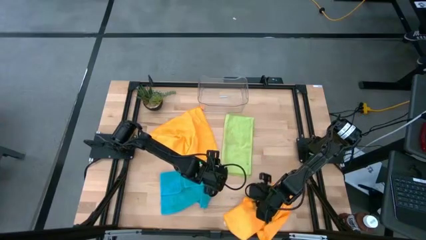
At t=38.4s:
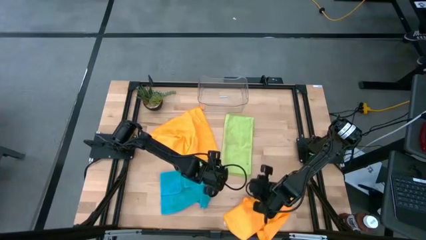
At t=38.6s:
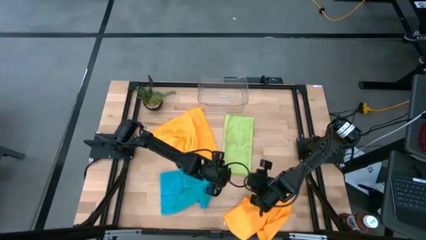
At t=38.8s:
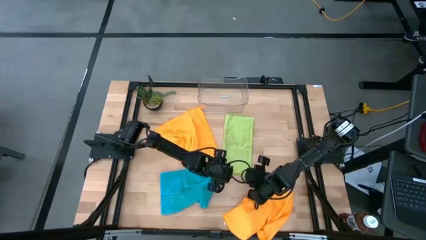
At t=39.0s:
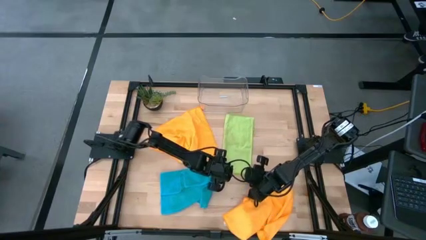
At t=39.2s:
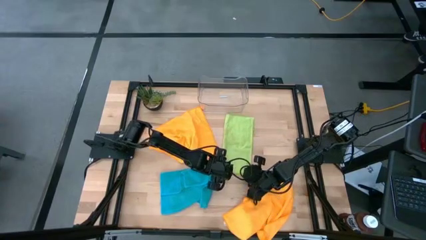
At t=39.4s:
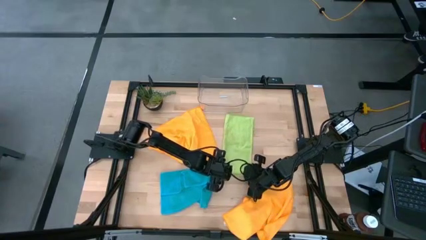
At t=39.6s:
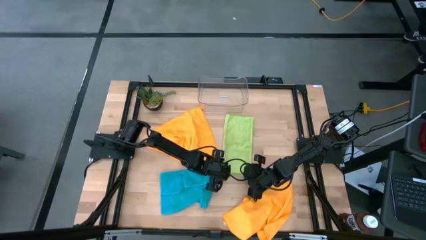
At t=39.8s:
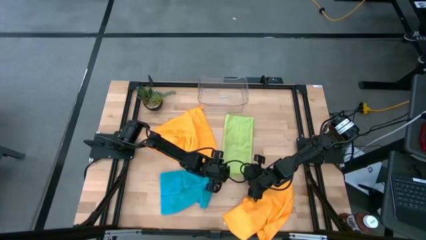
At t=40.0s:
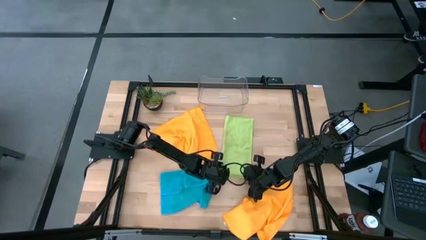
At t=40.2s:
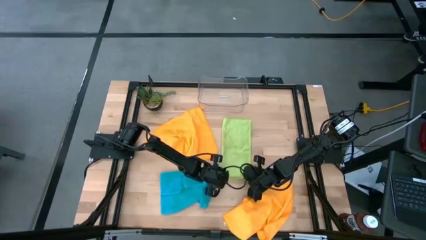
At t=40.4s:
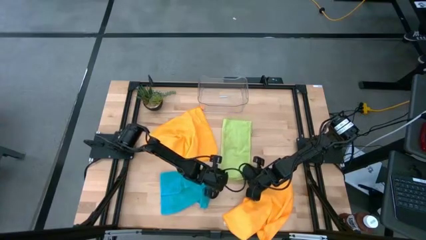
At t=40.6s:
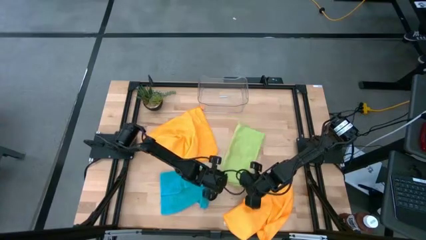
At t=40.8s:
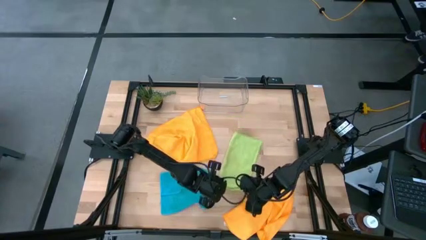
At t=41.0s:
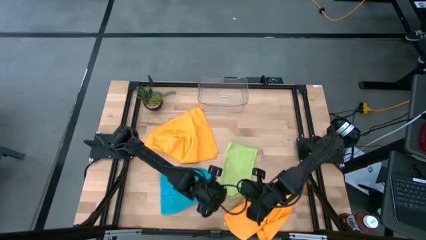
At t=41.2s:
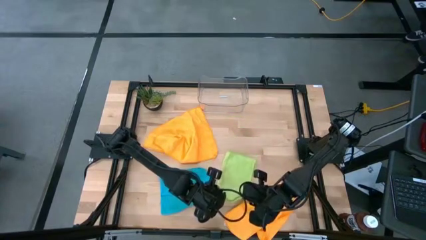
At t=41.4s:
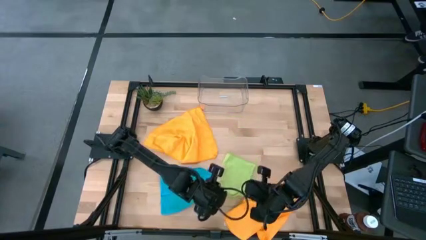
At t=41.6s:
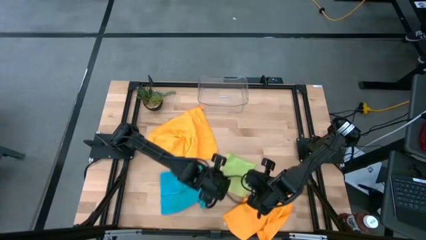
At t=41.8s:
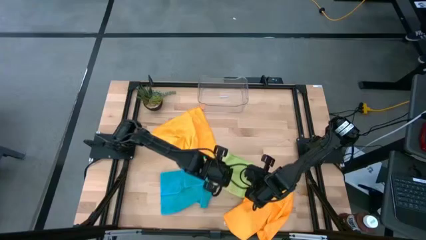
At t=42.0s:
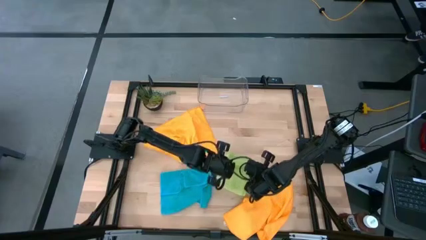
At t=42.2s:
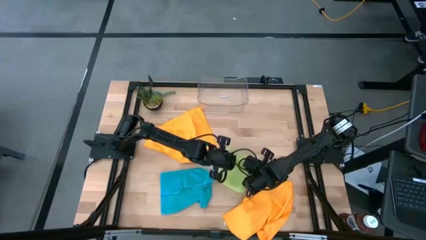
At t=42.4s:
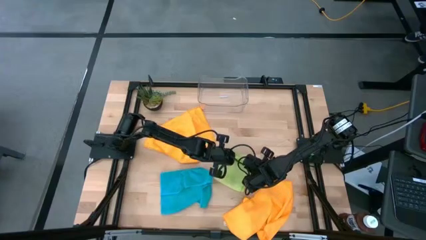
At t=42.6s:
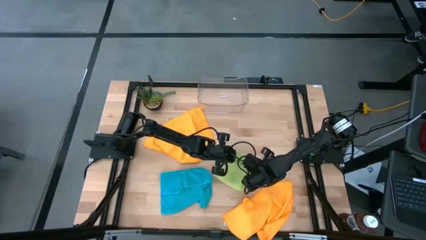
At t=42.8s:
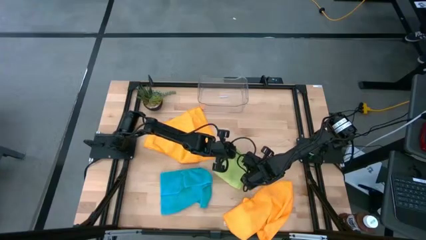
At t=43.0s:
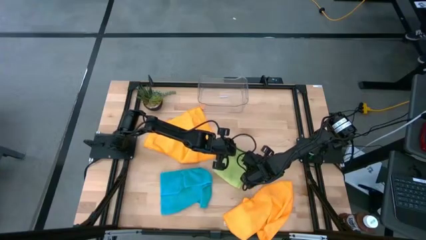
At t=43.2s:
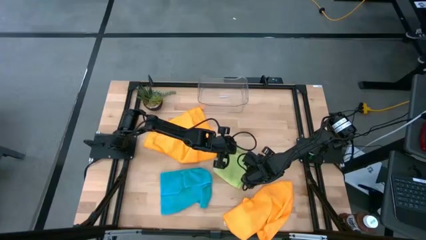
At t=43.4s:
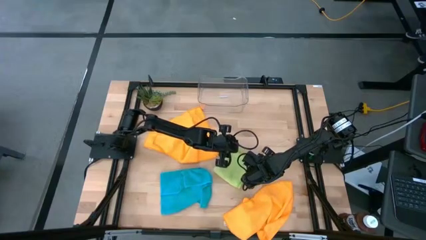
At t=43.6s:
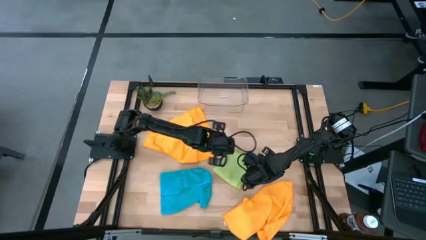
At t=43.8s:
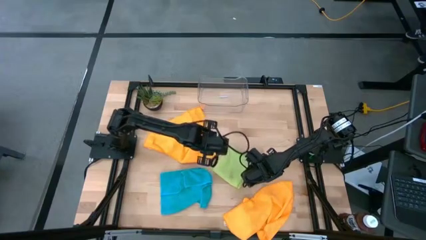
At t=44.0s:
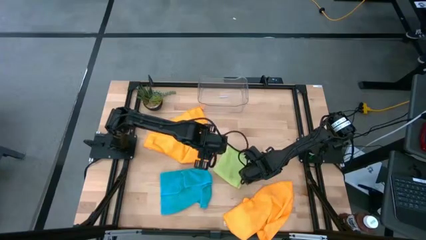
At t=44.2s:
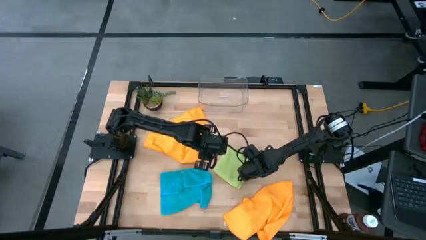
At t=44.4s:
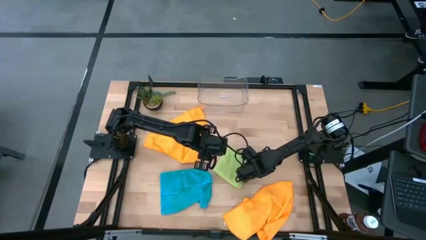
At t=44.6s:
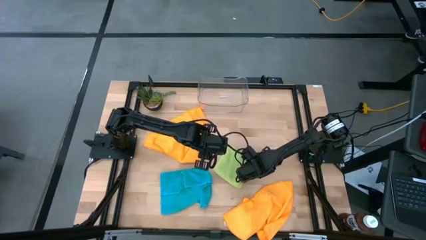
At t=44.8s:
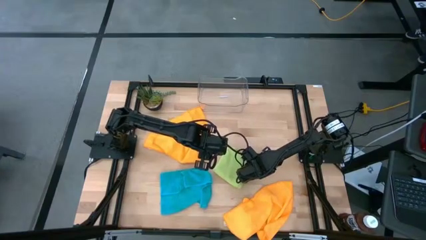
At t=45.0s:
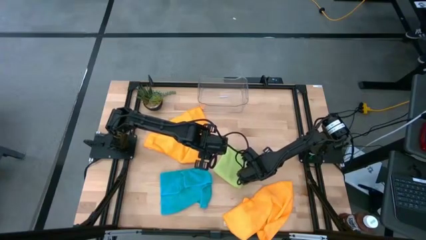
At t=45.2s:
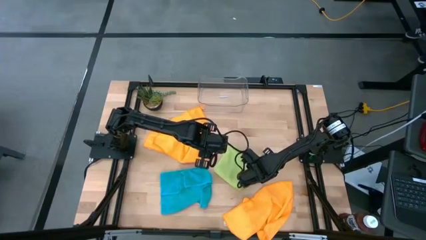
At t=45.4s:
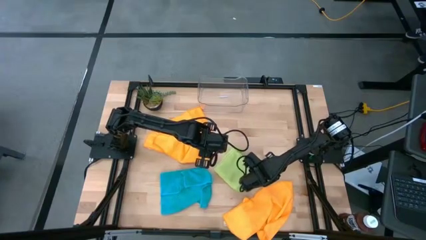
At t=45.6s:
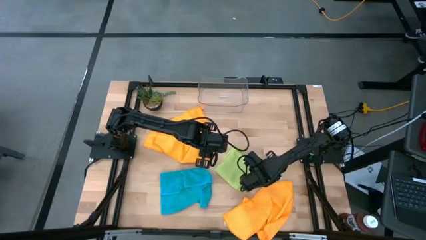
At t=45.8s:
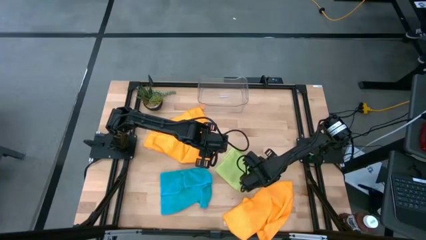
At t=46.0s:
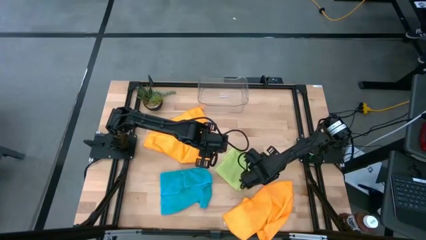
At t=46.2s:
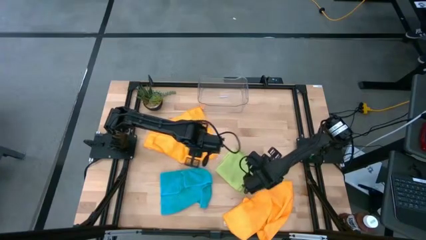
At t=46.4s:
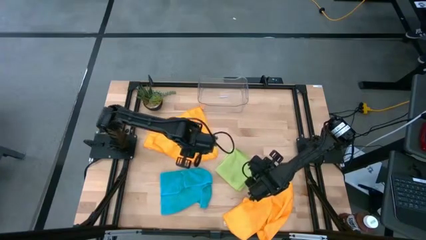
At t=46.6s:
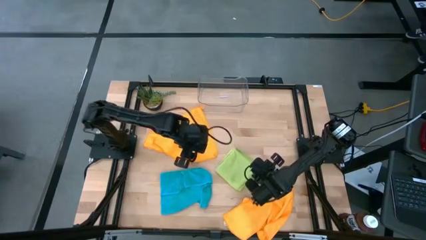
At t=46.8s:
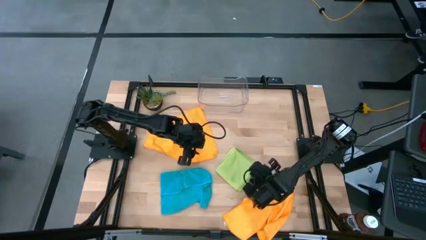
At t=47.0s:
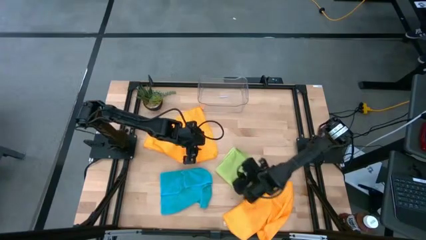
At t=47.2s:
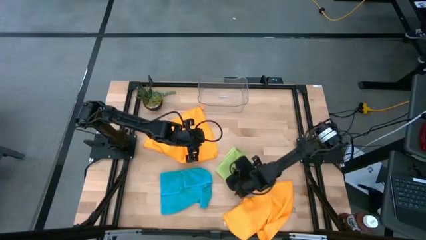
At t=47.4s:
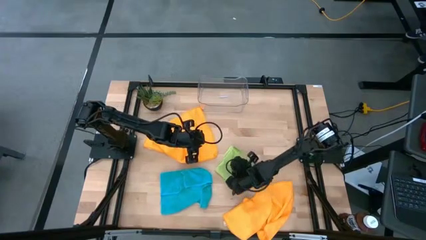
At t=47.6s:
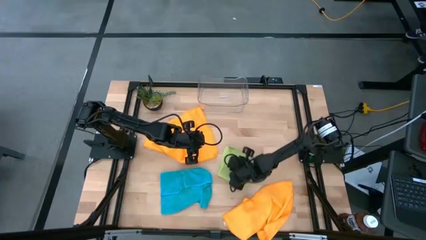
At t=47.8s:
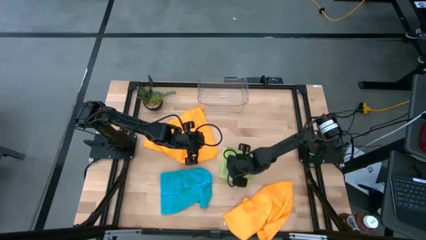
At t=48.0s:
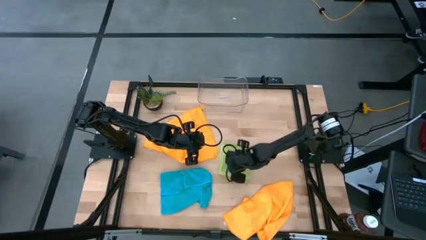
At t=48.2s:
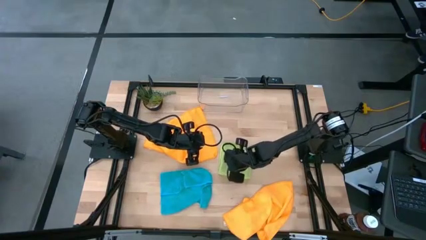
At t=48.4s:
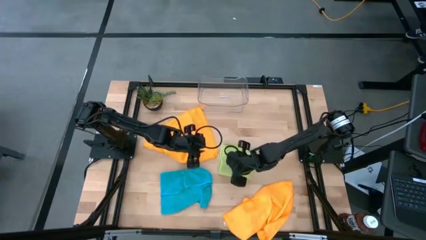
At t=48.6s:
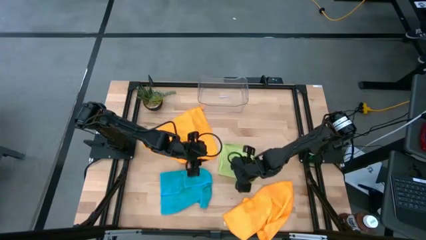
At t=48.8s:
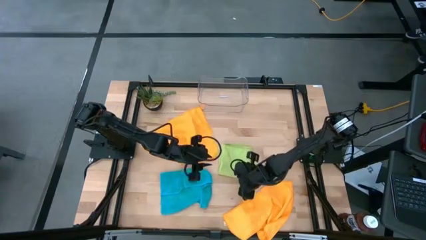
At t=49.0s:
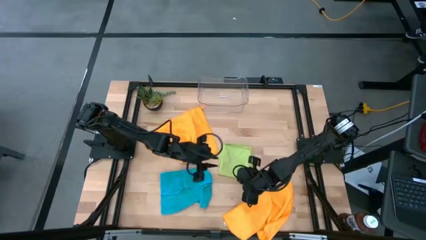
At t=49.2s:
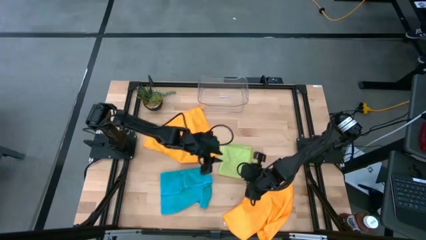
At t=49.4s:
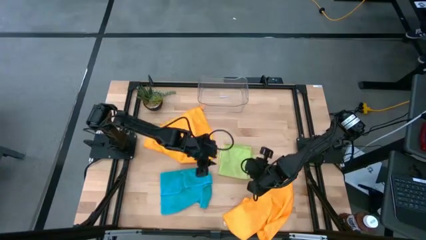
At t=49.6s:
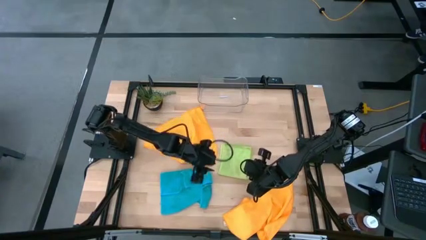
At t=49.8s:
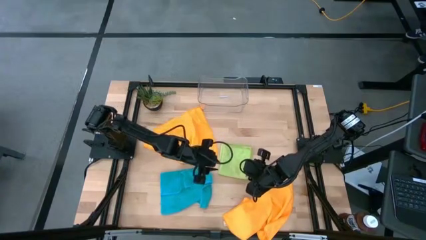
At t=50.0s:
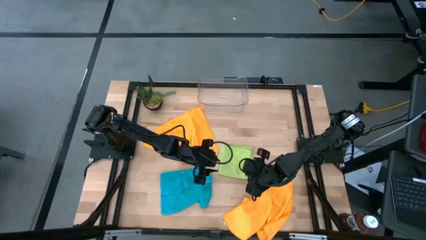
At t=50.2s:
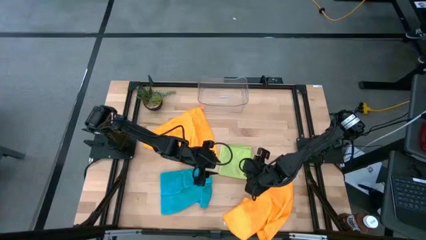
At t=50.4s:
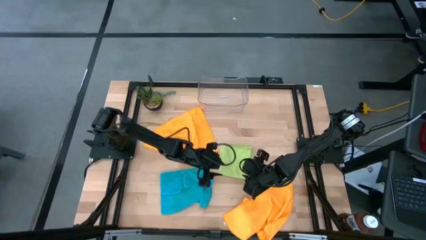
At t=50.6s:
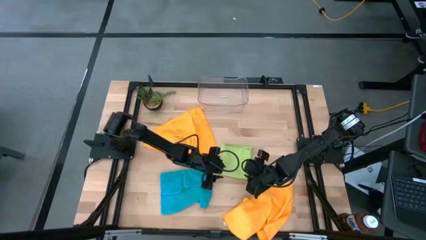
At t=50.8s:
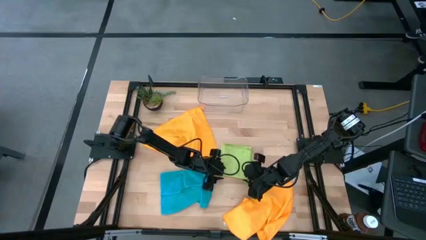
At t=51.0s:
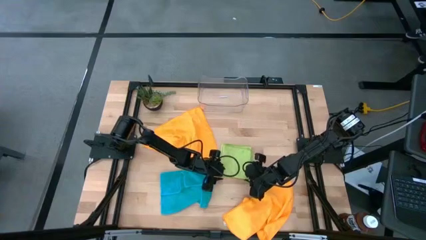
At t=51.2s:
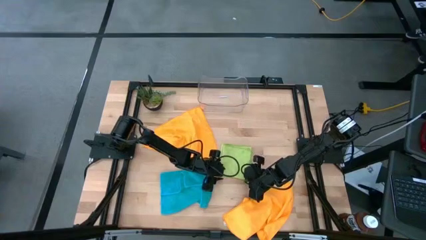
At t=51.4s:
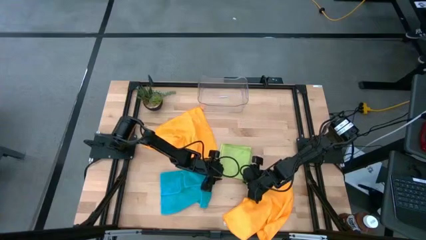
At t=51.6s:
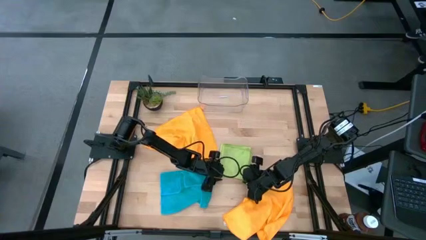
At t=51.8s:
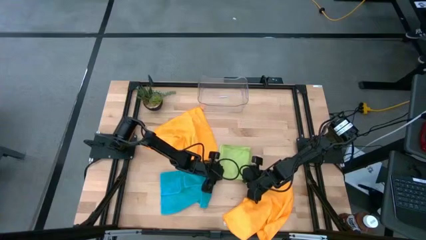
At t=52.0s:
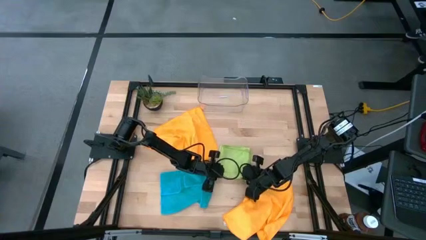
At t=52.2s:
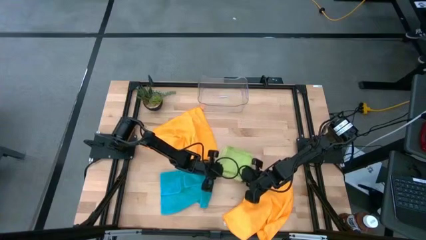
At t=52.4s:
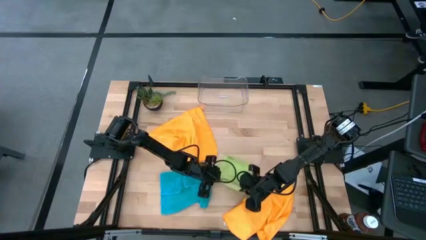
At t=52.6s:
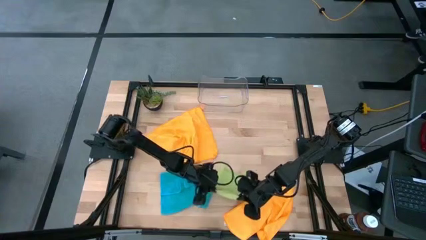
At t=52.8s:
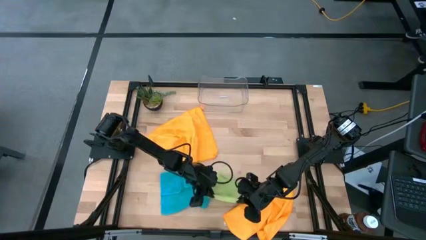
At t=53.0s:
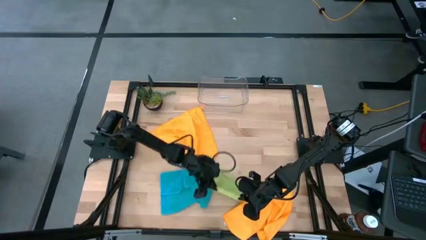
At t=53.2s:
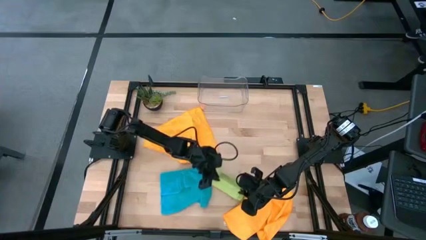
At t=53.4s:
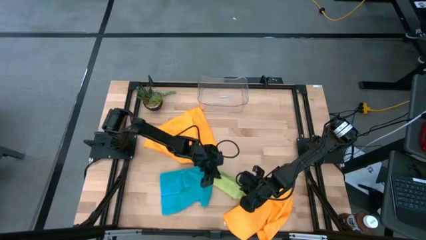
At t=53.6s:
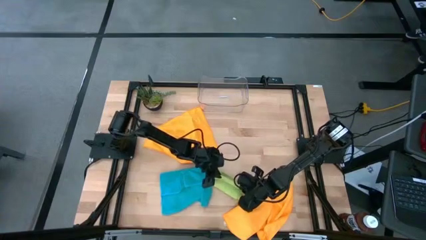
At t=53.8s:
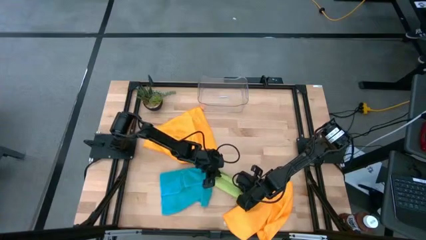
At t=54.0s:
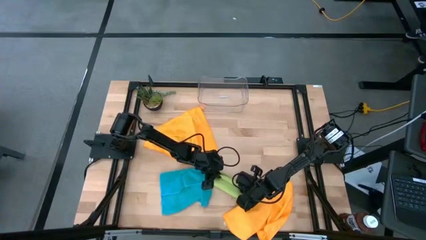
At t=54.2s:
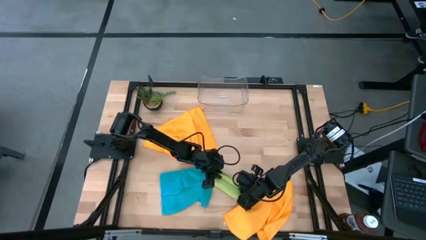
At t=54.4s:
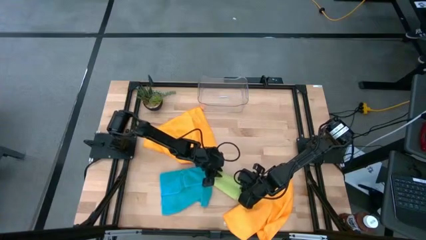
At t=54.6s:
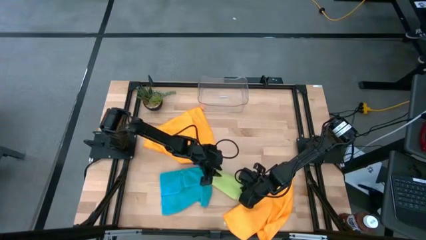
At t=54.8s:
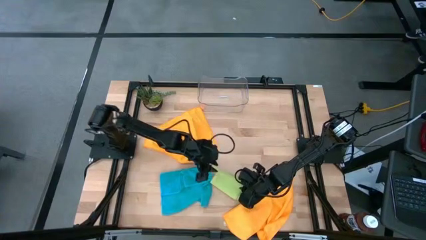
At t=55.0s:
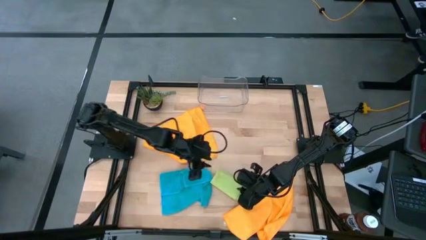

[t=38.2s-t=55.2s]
Task: Fold microfiber towels
Fold the green microfiber cloth
